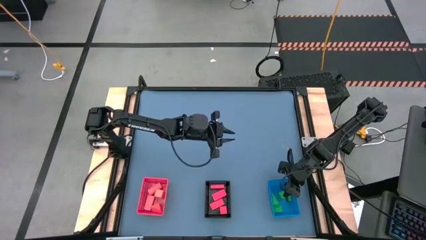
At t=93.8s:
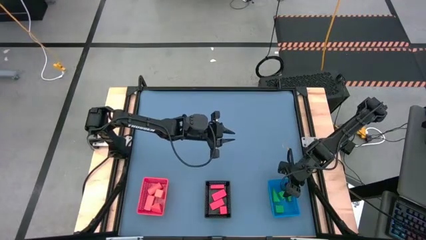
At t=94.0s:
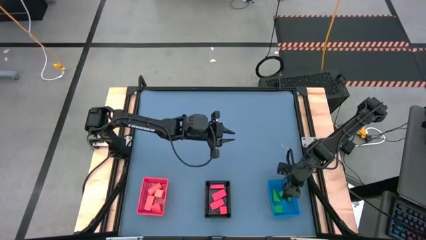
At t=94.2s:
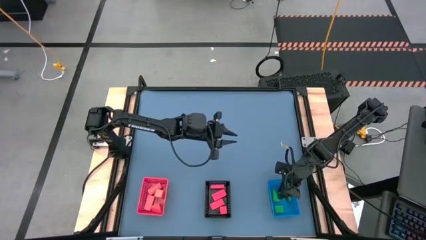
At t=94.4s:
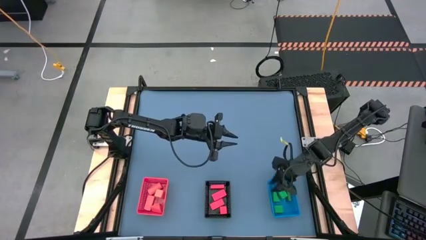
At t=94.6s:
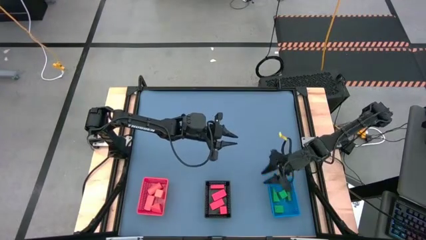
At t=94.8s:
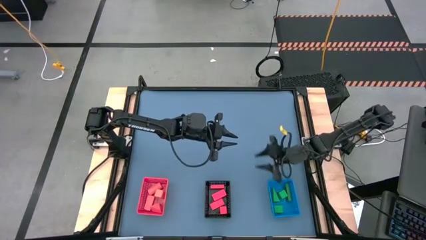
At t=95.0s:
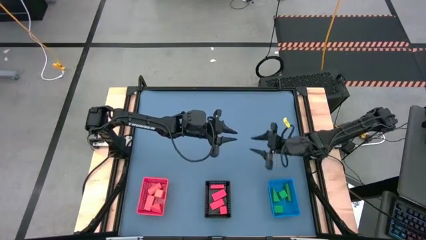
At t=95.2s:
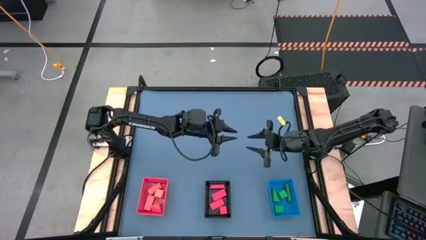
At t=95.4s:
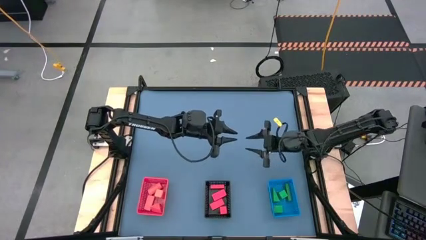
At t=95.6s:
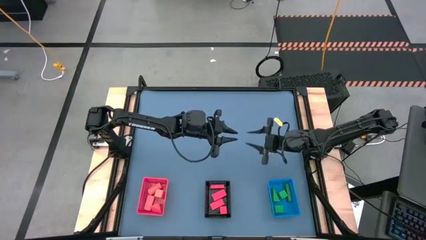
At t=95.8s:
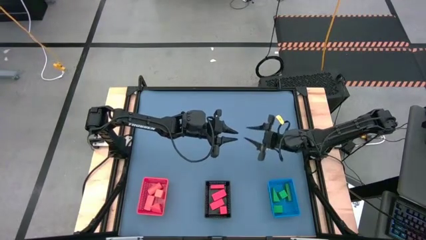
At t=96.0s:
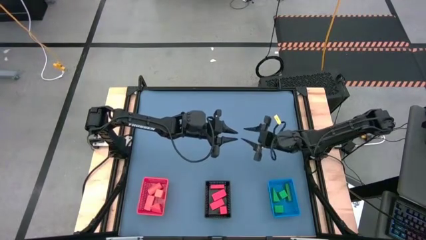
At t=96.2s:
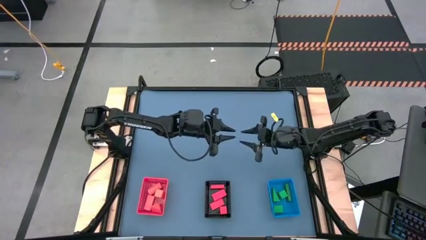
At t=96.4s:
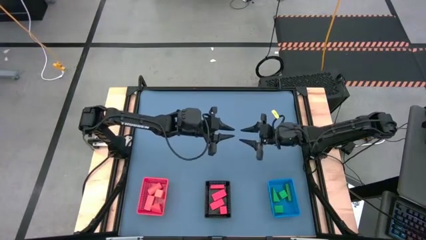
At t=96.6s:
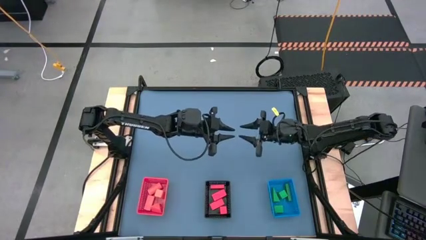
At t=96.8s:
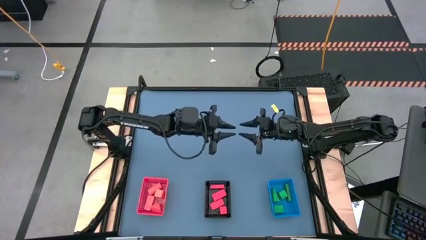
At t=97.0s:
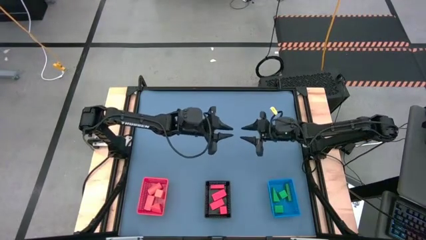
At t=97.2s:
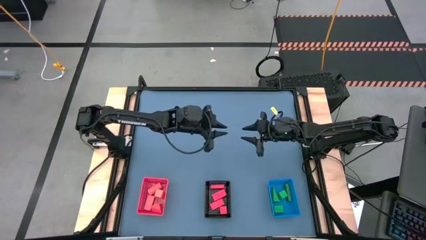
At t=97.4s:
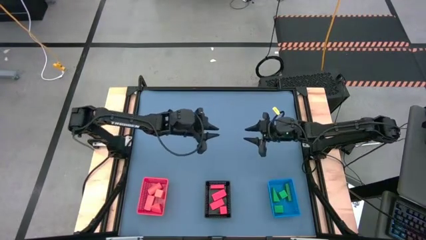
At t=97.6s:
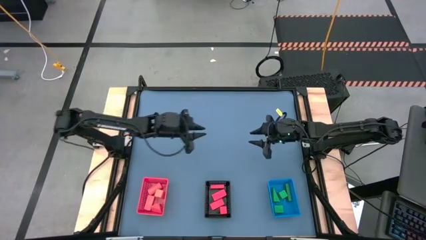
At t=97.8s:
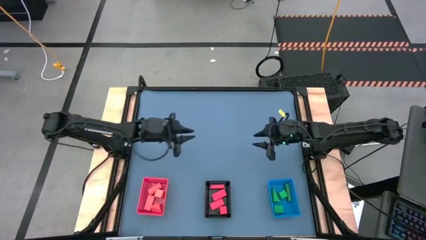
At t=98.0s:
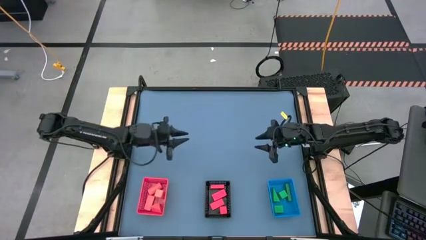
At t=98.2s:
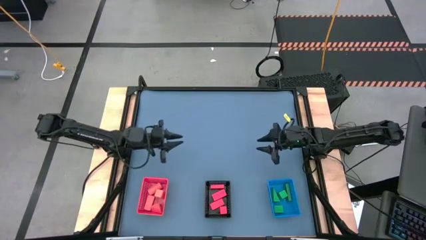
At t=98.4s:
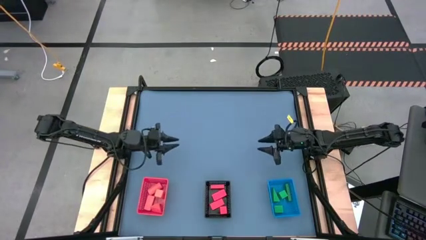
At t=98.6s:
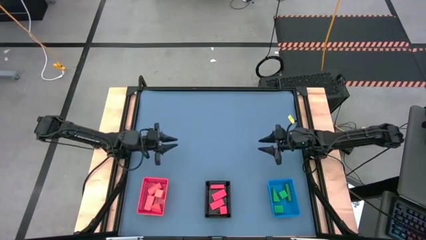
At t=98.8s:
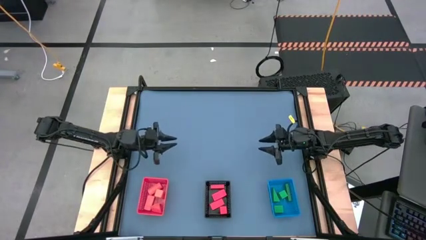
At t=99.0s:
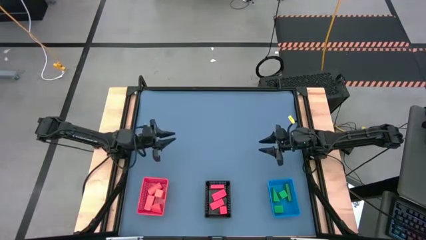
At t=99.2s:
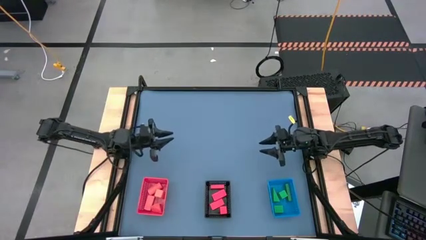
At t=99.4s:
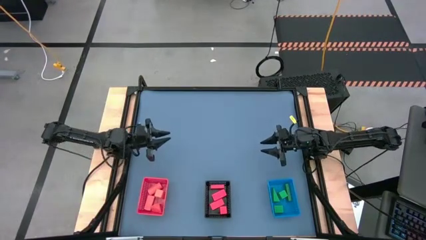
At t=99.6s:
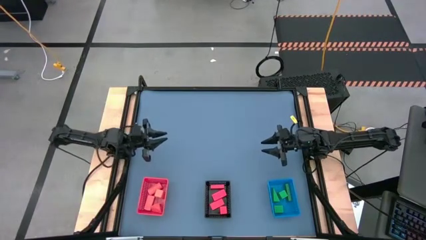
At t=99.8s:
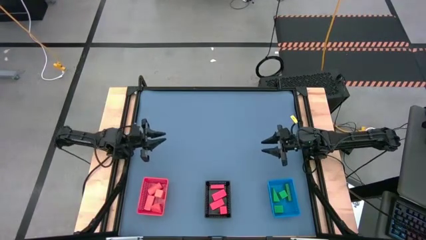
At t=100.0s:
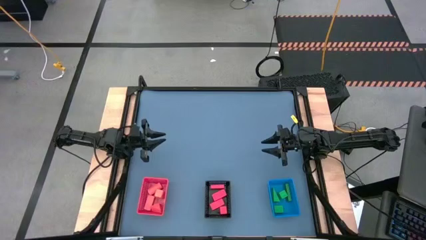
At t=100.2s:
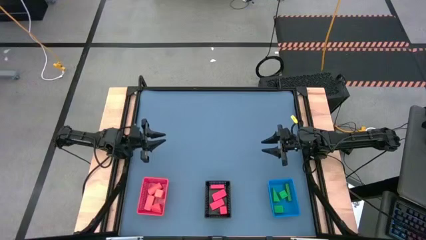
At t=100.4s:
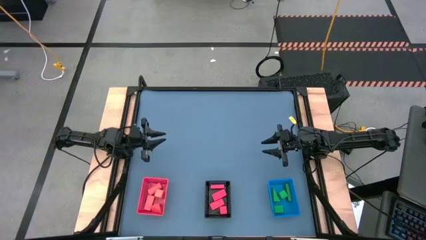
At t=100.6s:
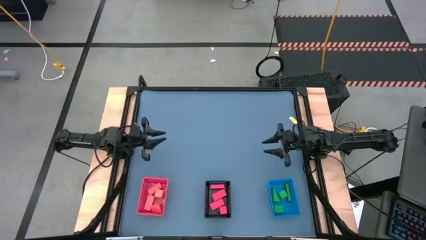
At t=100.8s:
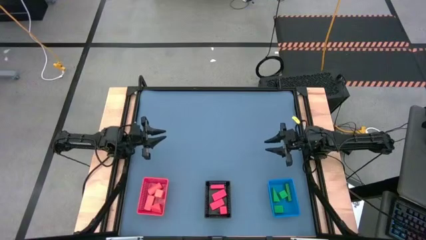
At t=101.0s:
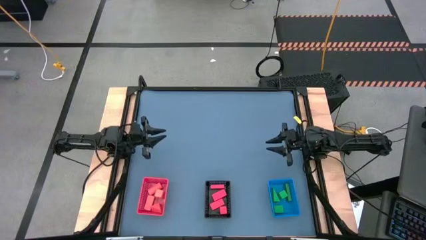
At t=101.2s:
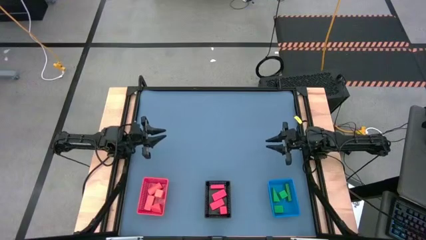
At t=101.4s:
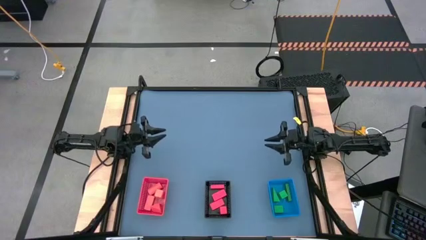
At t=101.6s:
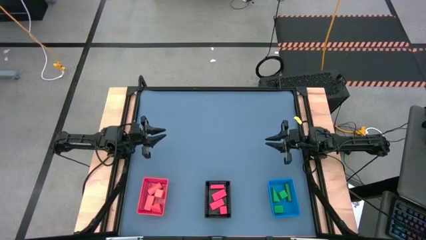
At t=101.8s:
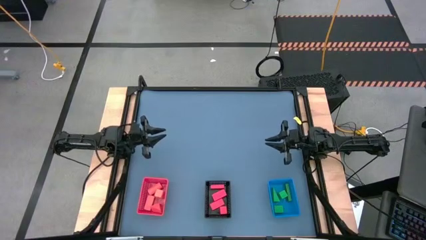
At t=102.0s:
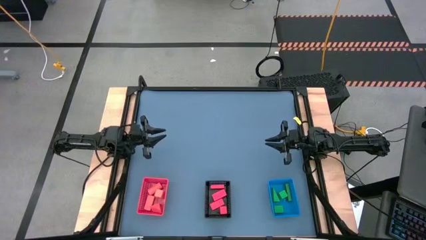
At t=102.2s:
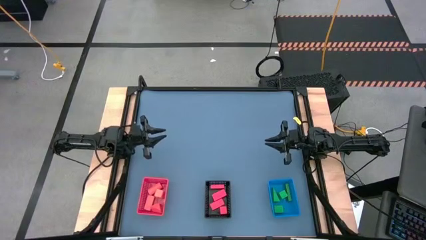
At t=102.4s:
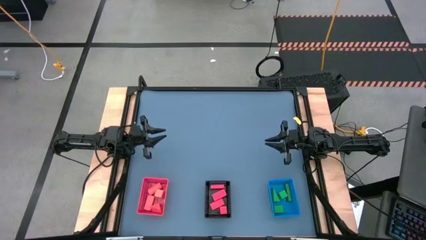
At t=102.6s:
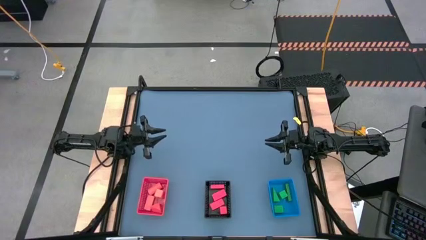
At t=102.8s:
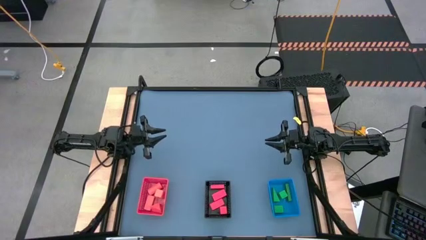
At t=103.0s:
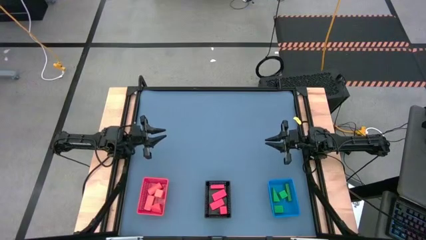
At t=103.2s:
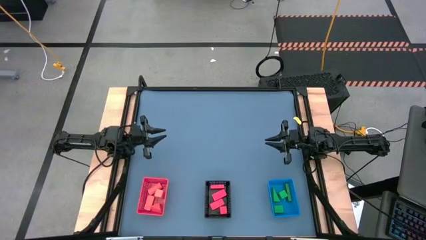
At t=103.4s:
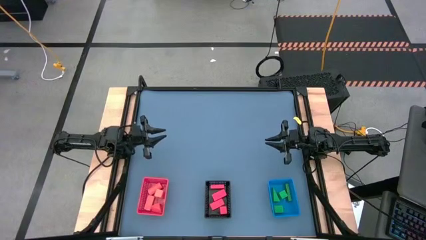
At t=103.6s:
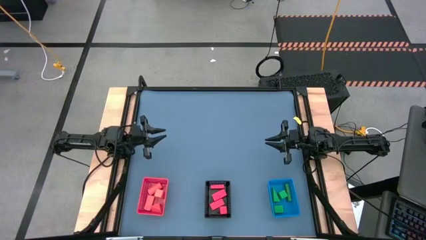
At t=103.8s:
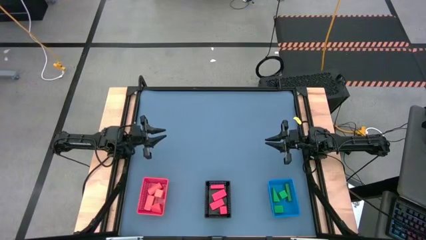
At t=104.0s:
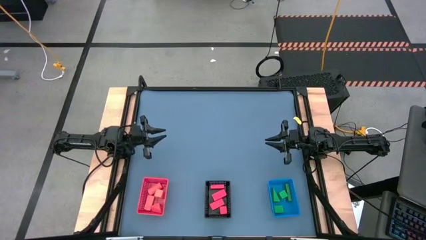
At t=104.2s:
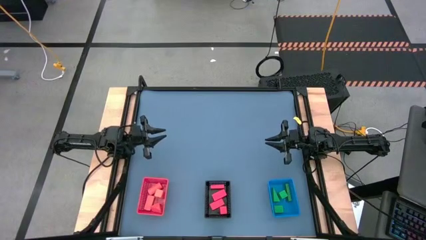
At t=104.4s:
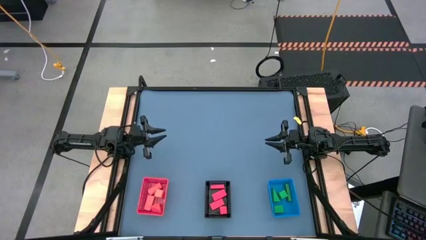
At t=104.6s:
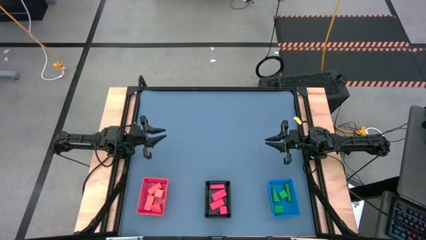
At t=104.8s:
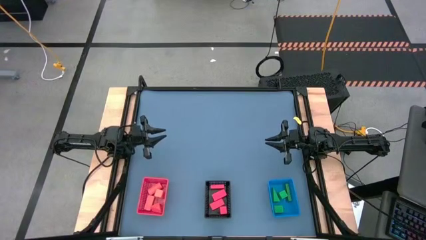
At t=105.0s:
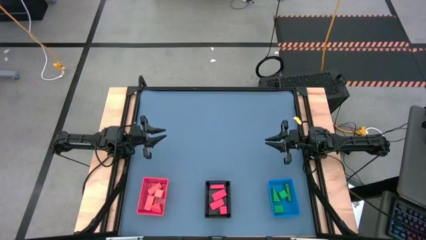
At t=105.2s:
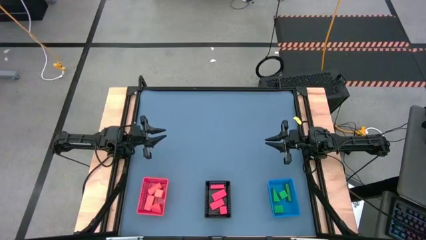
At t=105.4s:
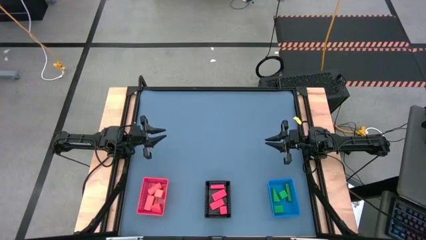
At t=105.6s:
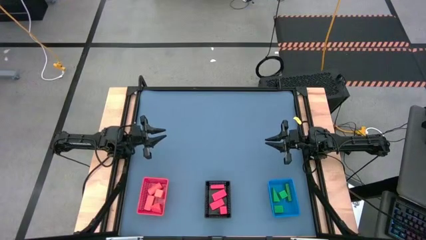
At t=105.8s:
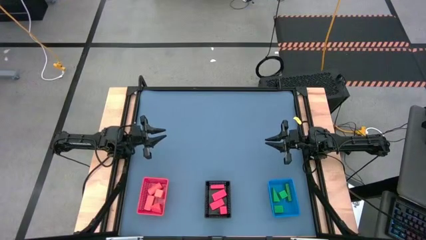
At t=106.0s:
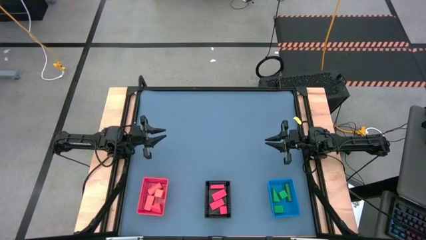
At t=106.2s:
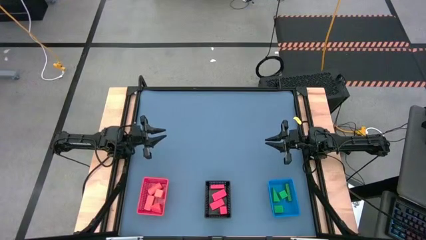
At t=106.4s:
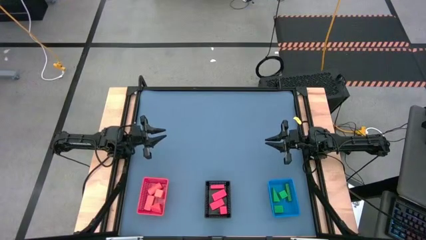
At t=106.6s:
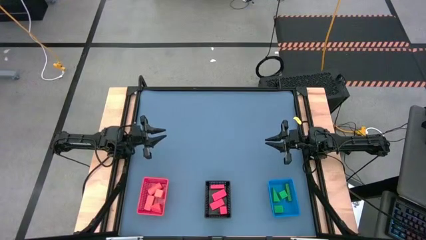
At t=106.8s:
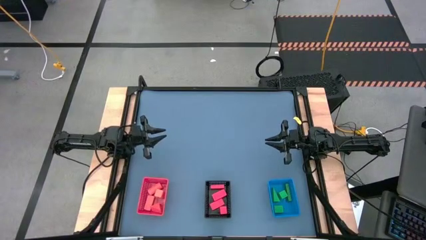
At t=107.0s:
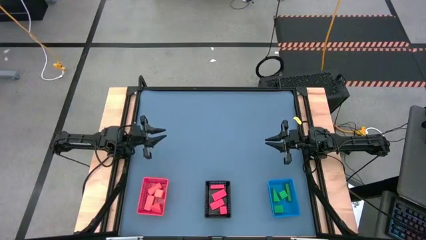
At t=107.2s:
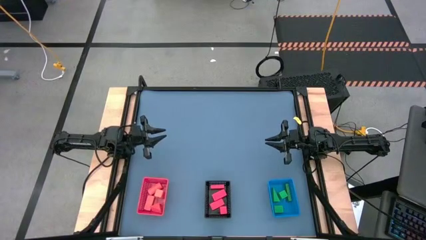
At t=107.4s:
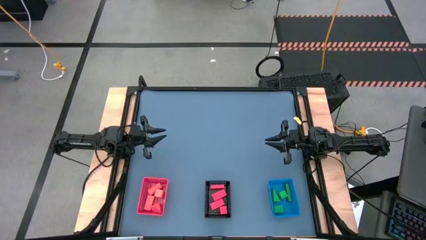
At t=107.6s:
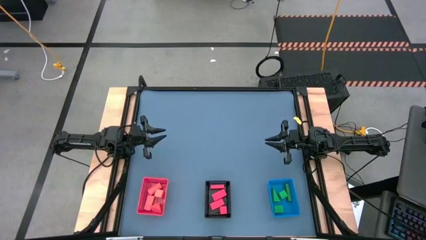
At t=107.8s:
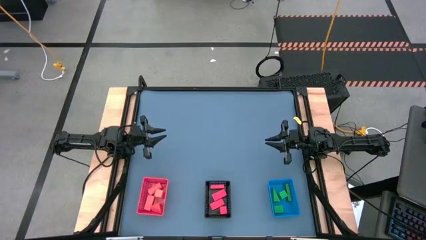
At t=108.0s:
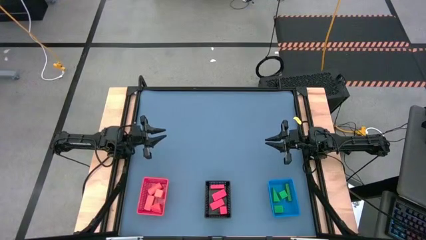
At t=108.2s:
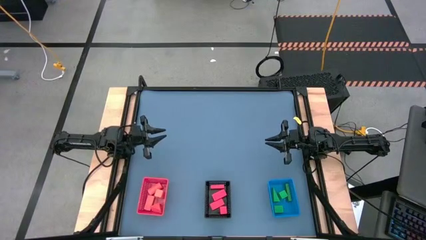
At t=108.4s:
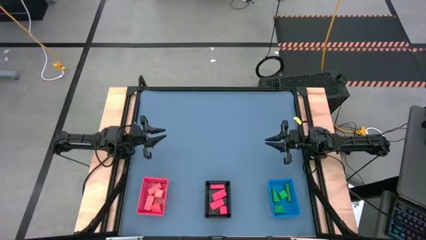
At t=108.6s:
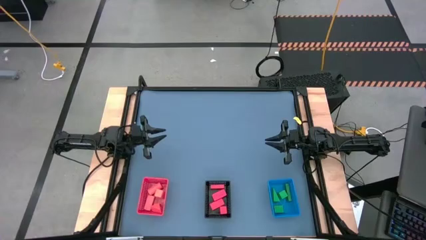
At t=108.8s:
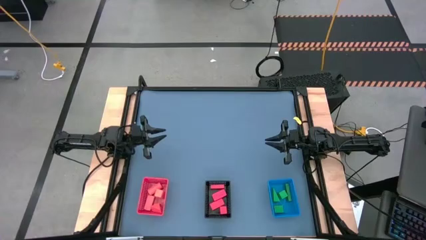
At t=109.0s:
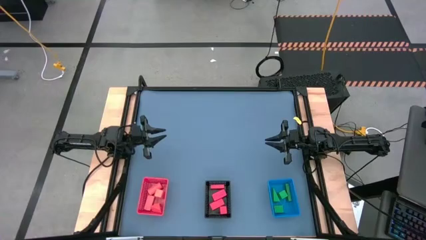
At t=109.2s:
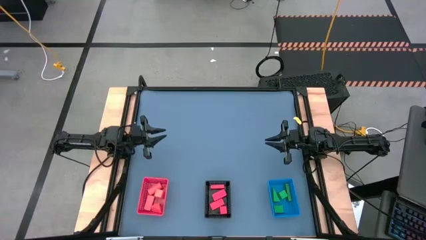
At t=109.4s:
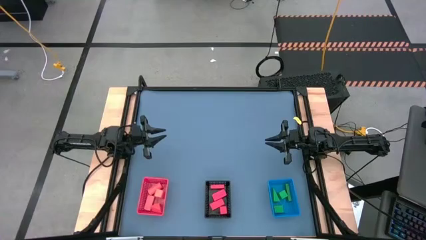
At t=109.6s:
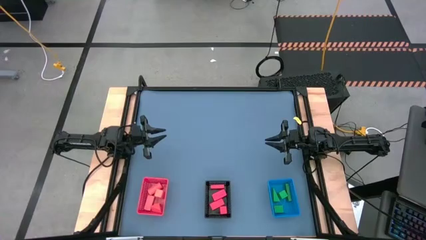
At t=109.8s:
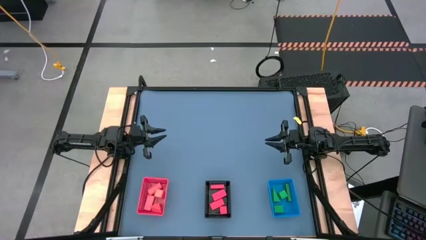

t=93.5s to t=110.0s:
Task: Sort & place blocks by color
Return to Home Position
